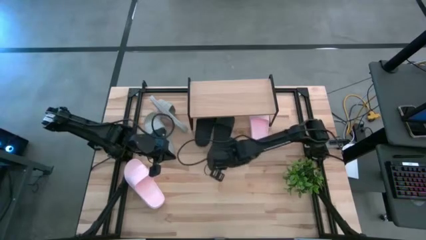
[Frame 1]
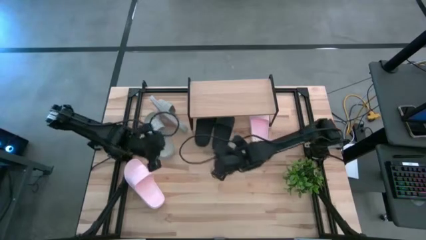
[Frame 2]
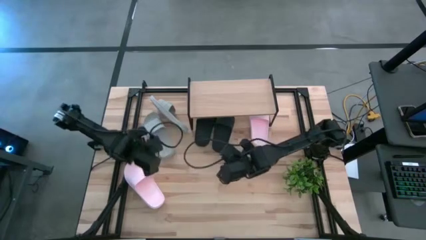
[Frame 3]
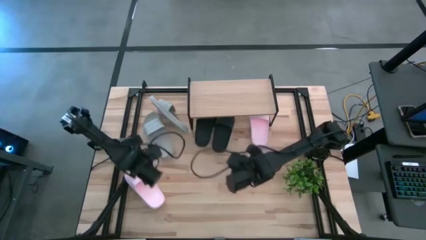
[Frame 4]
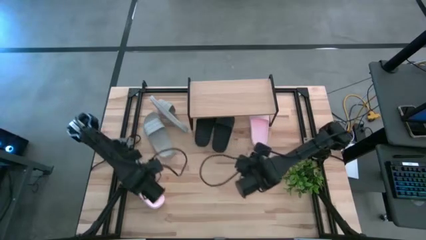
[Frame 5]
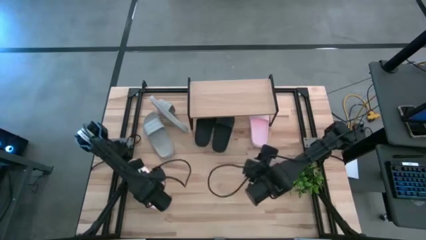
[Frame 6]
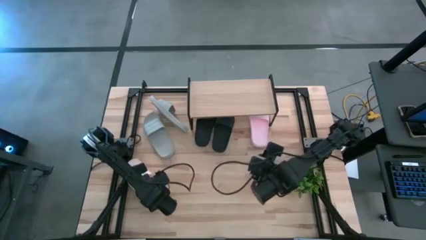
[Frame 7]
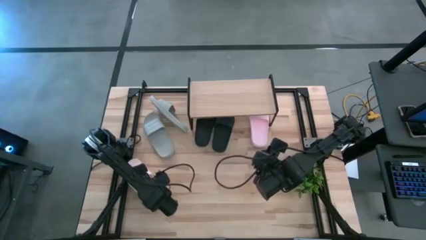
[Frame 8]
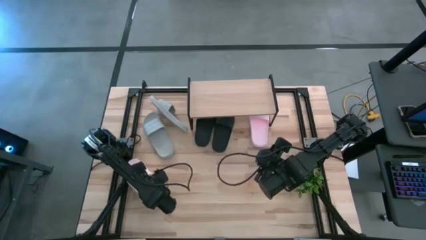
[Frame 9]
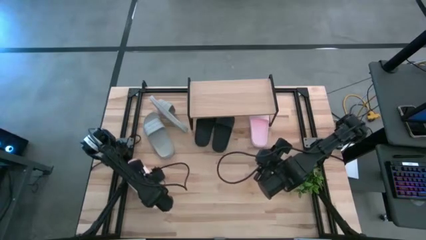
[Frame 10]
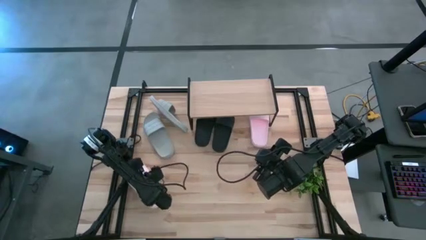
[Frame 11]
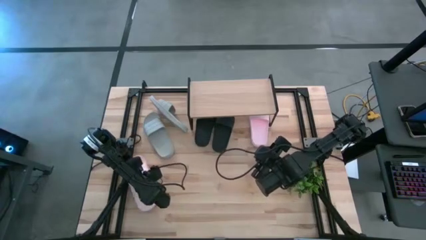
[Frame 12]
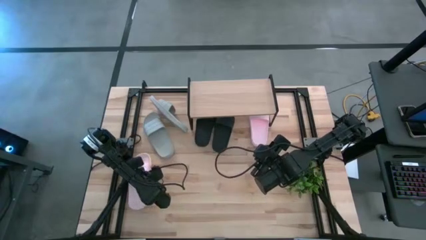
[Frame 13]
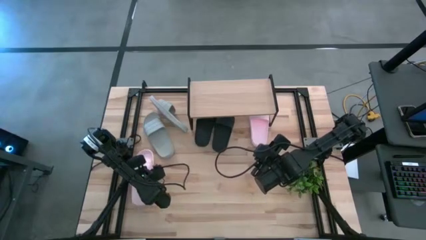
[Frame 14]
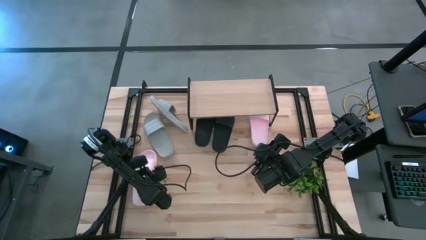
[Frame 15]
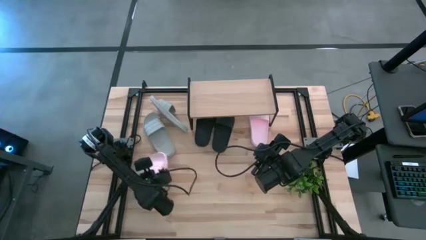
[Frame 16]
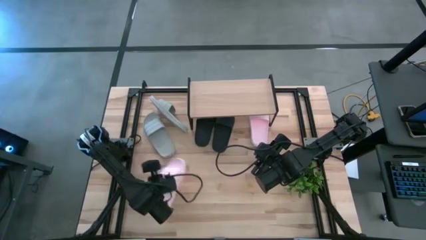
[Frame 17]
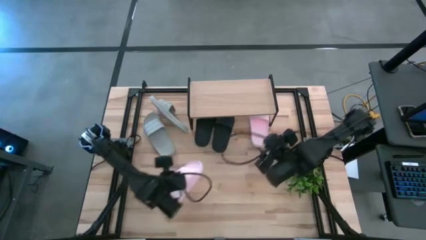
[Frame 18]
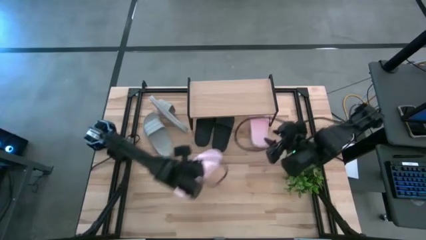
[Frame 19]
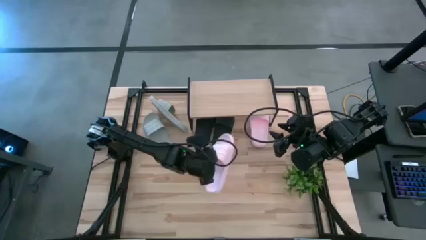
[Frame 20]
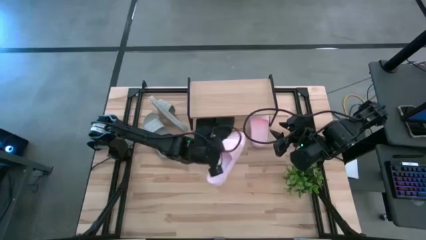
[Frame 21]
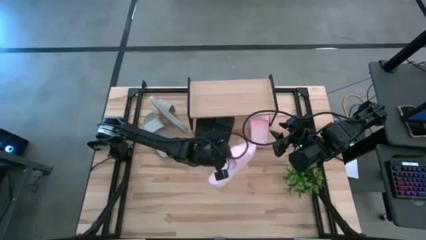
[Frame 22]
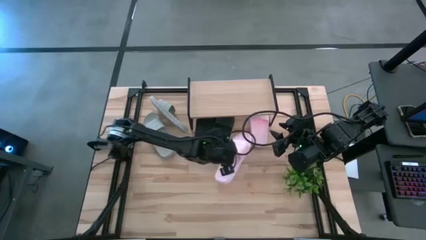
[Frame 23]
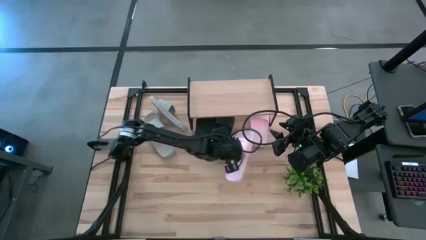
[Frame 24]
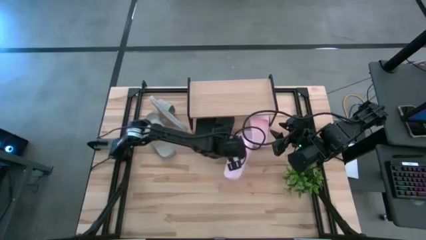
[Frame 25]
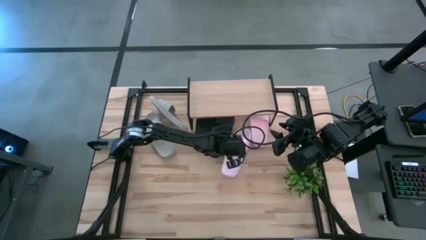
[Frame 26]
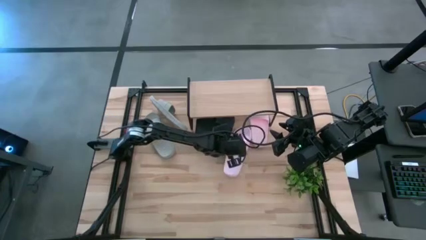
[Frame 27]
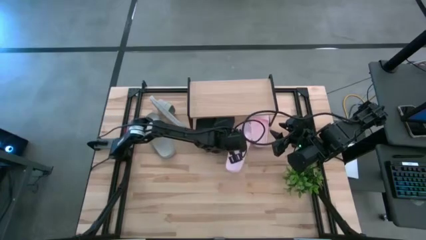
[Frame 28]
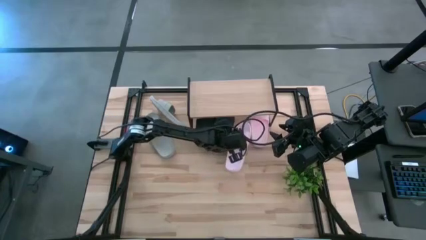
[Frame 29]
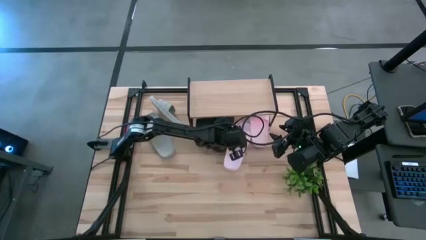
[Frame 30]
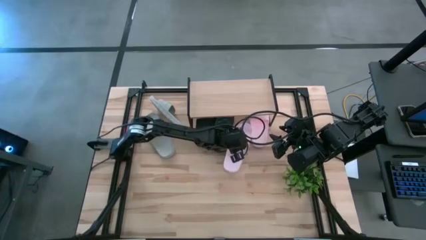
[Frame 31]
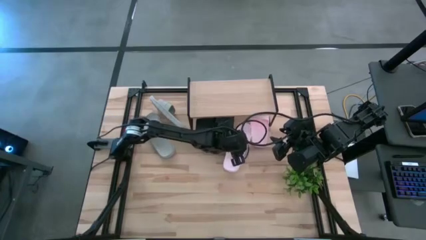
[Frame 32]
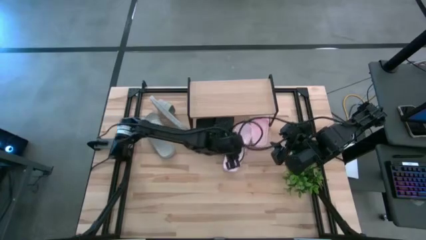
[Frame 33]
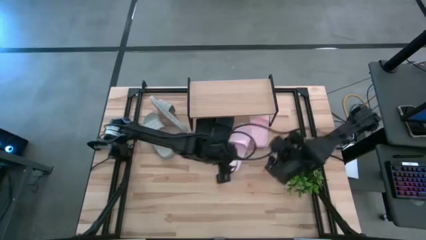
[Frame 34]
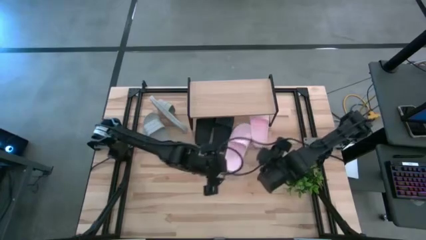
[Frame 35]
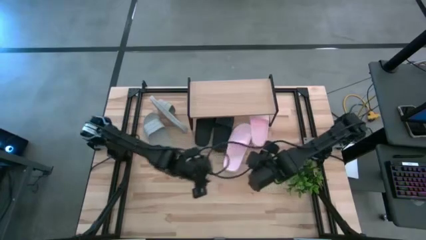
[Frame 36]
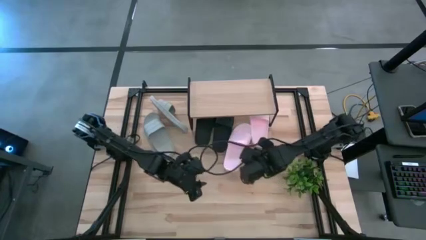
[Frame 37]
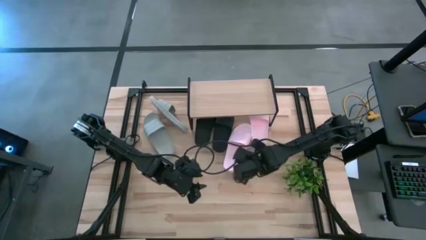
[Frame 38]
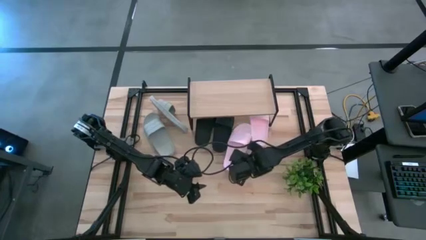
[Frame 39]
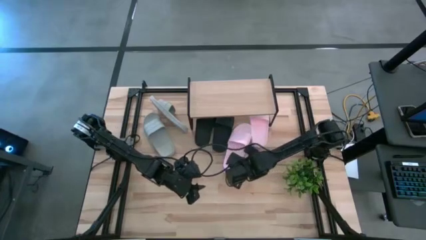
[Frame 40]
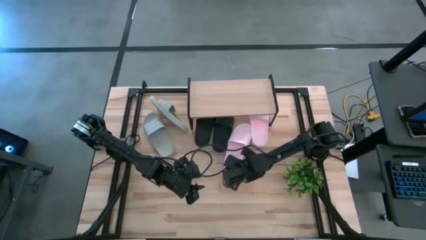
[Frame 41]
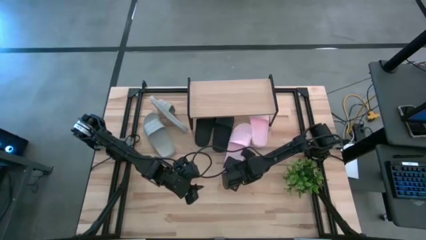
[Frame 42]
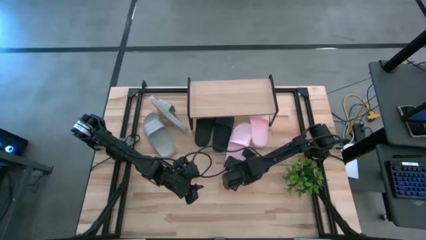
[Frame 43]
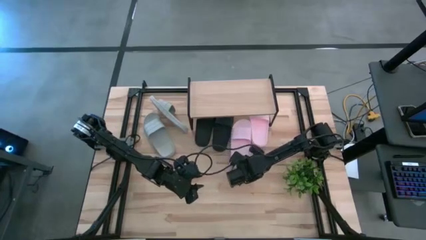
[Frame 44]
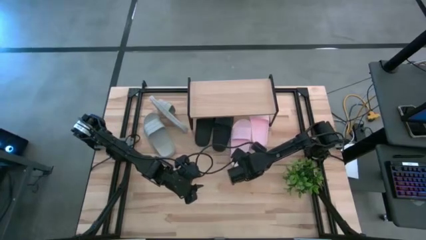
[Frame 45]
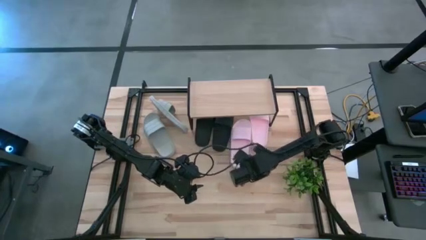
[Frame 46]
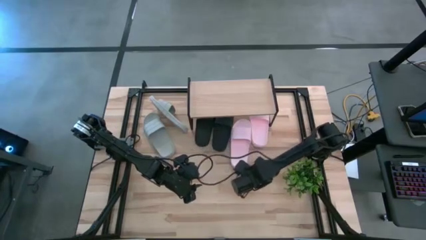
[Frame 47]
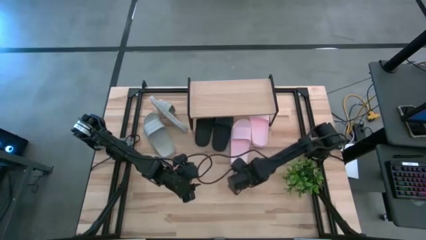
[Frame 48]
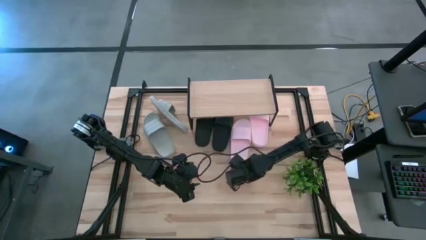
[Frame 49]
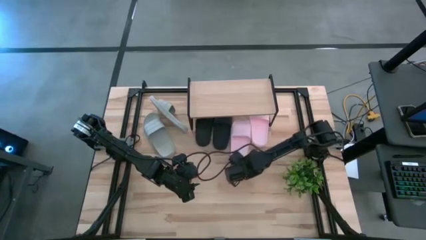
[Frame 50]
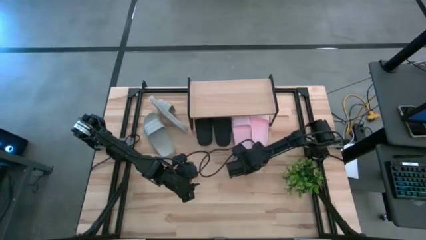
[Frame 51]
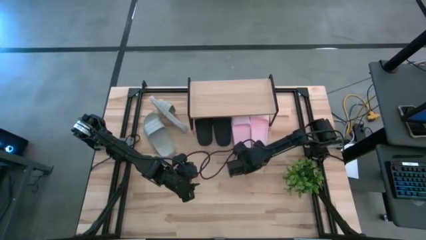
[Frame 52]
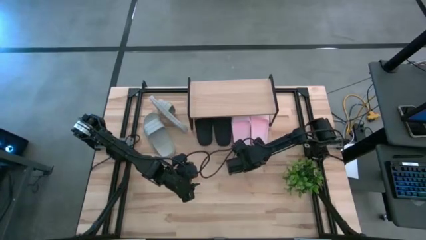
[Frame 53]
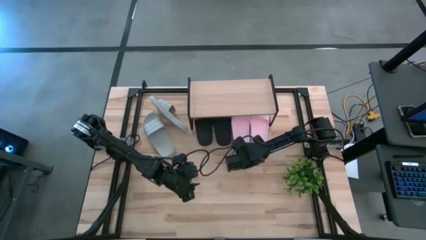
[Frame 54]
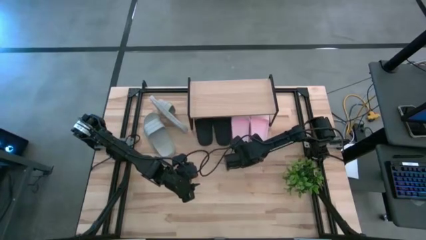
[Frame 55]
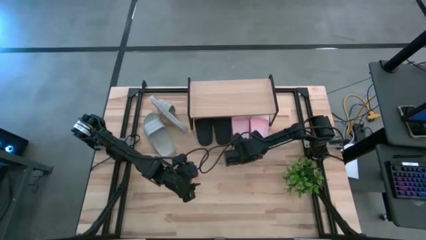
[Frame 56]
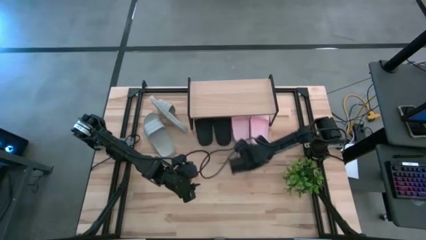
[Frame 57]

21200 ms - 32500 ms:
Task: Pick and place slides into the shelf
Put the pink slide under the shelf

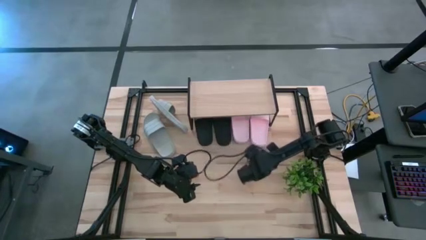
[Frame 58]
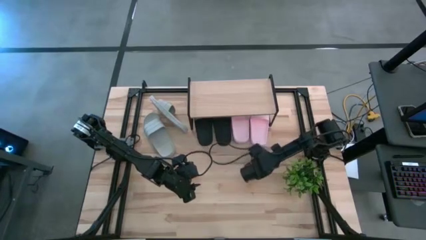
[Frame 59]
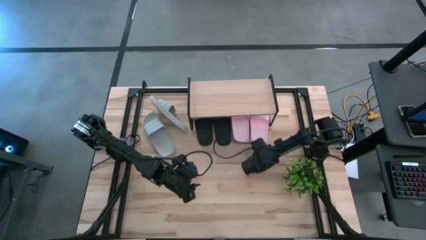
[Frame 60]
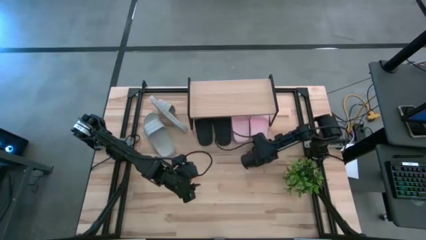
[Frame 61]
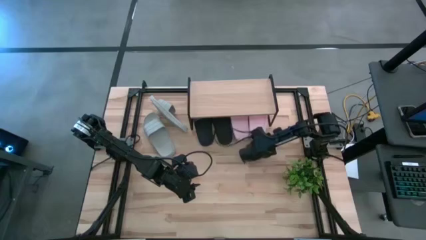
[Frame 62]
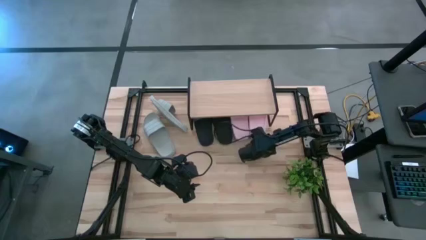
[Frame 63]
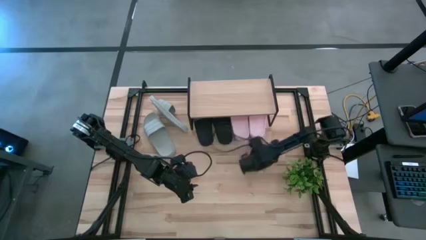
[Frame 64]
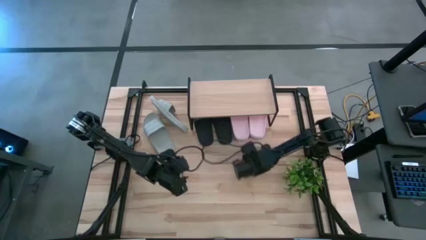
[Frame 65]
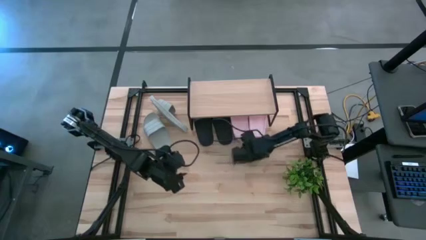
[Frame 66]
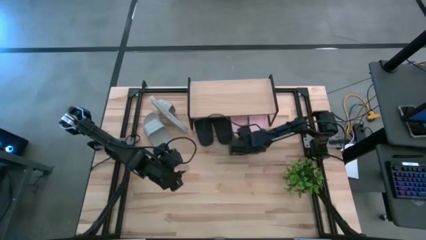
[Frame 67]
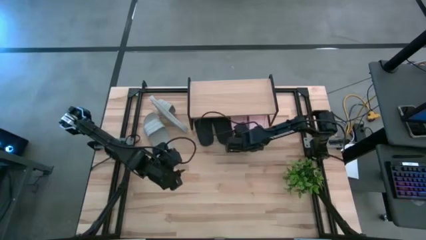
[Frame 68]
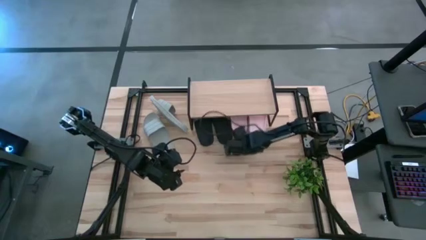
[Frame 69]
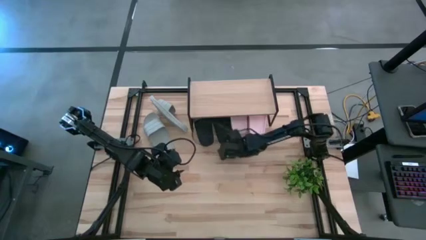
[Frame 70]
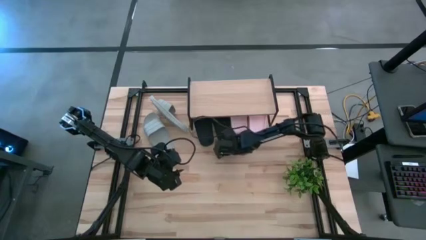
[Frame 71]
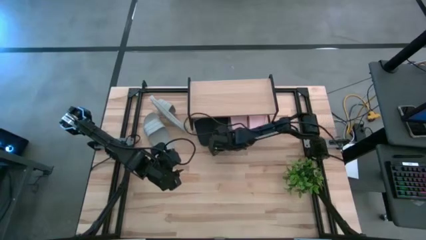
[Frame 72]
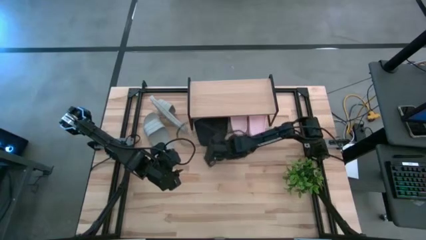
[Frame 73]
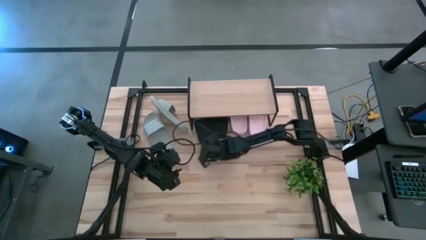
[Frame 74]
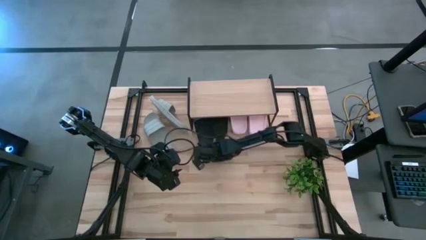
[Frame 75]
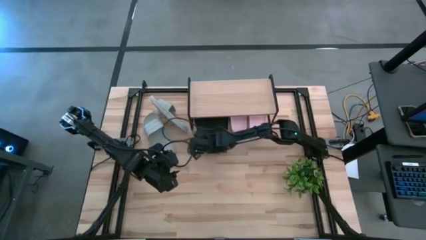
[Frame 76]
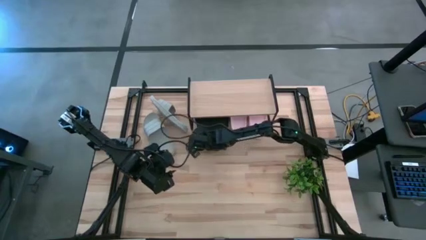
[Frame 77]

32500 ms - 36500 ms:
Adjust the slides under the shelf

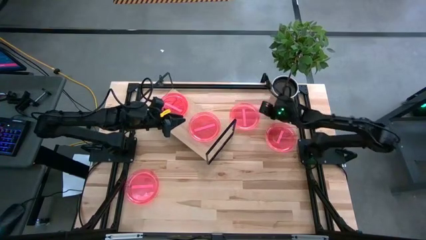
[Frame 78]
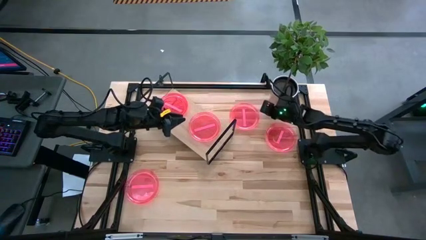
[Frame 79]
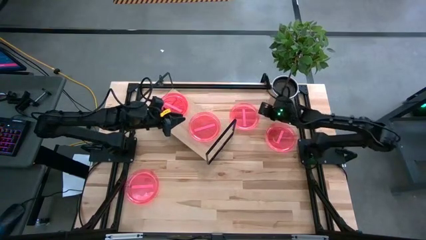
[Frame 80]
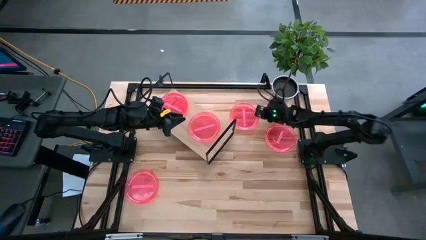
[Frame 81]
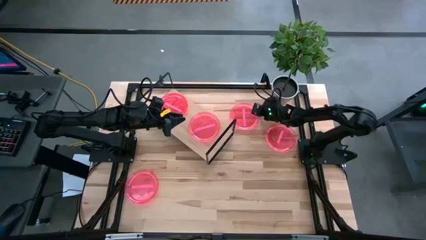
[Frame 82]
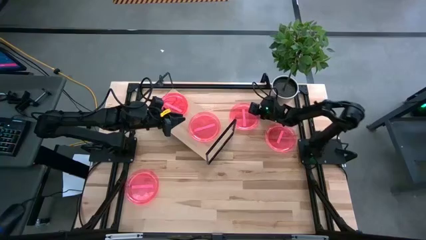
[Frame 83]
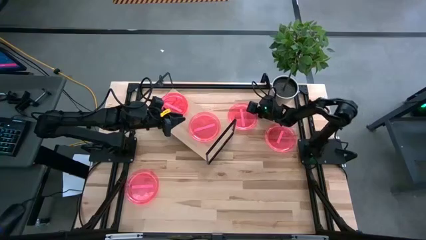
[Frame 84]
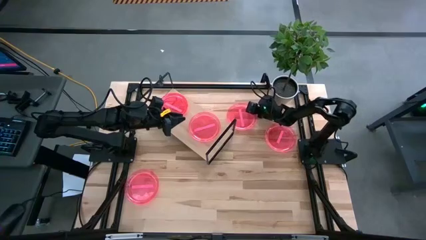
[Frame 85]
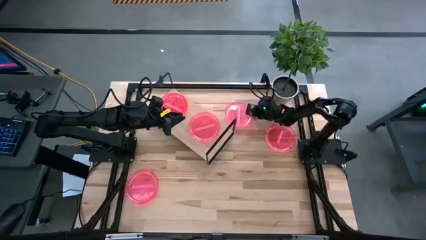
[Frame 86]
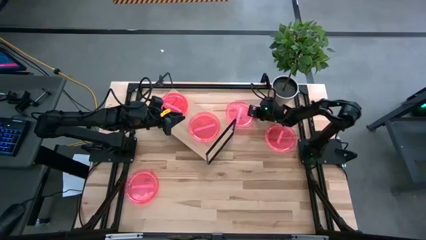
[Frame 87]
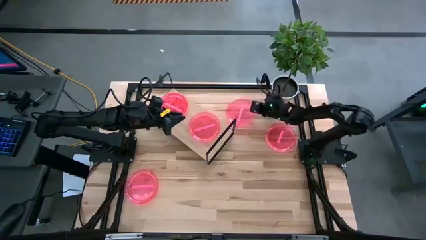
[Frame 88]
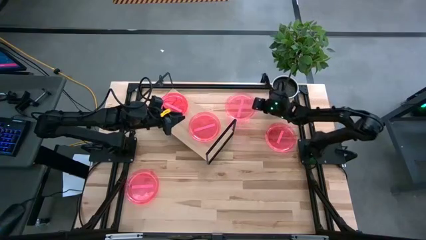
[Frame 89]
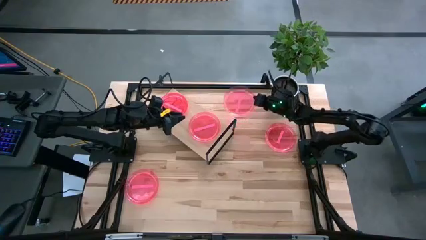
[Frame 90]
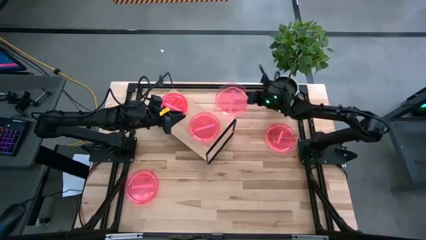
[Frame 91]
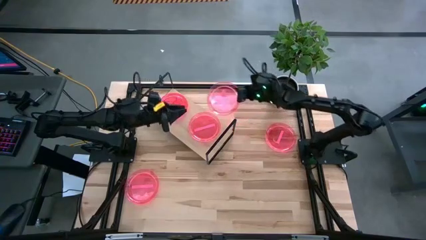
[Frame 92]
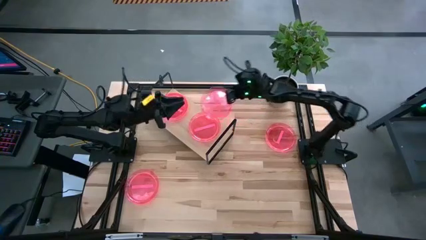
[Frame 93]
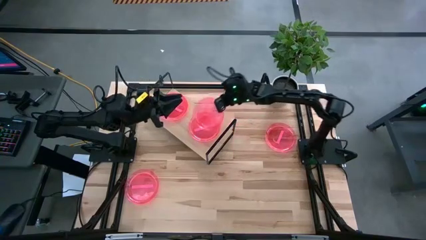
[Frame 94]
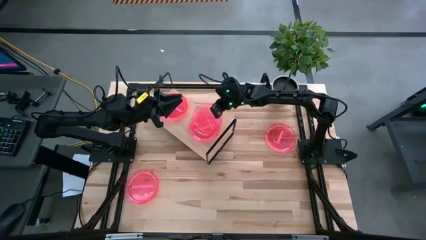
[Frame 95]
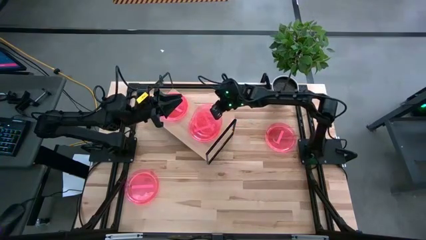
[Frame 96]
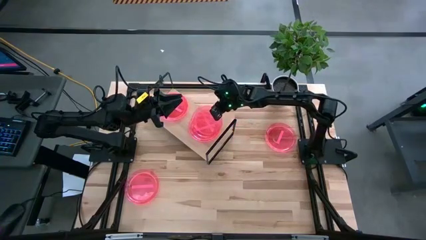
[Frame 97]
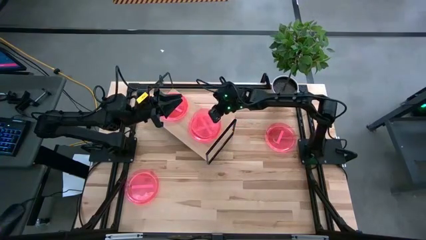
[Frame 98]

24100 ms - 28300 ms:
Task: Place and stack plates onto a shelf
Stack the pink plate on top of the right pink plate on the shelf
